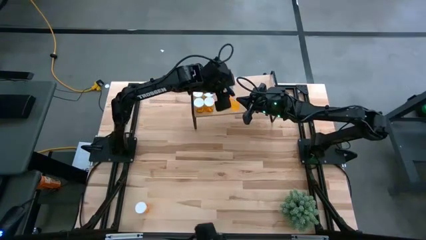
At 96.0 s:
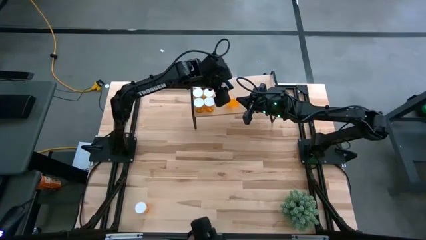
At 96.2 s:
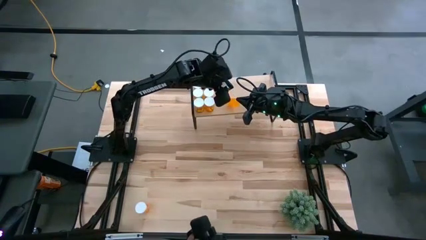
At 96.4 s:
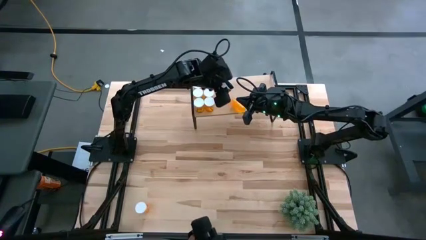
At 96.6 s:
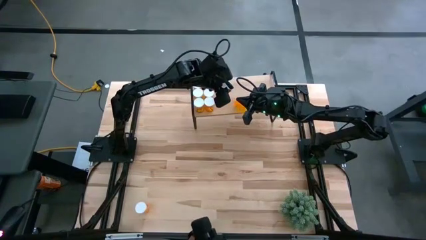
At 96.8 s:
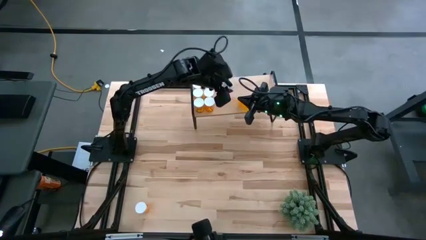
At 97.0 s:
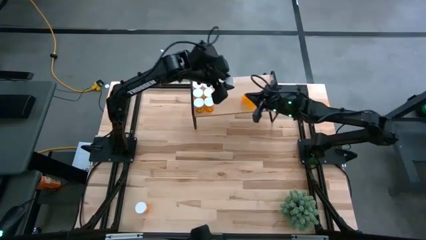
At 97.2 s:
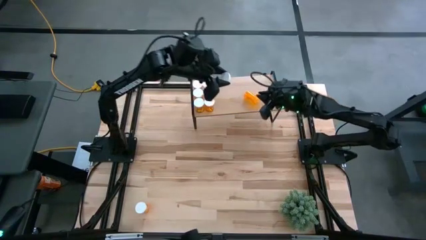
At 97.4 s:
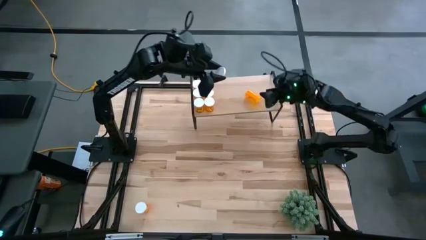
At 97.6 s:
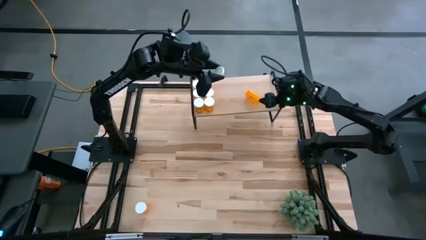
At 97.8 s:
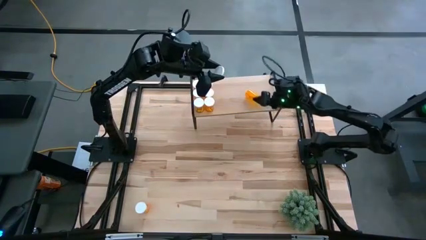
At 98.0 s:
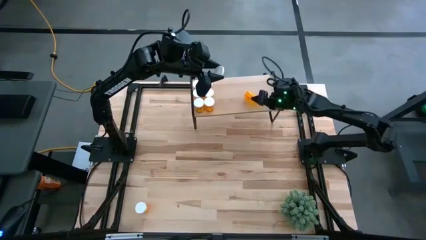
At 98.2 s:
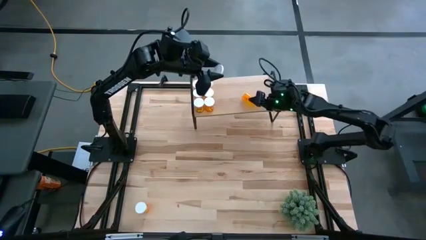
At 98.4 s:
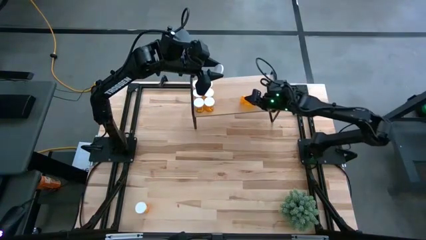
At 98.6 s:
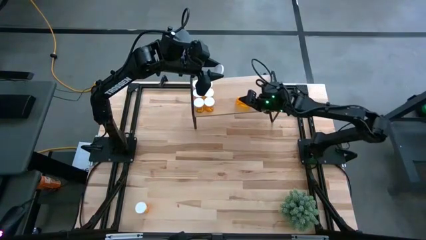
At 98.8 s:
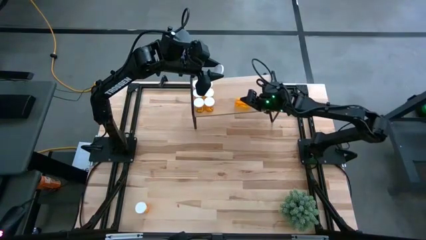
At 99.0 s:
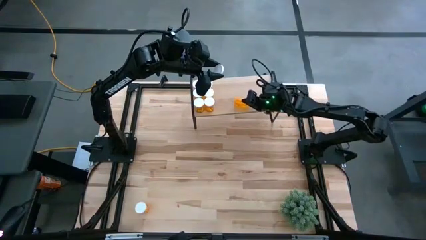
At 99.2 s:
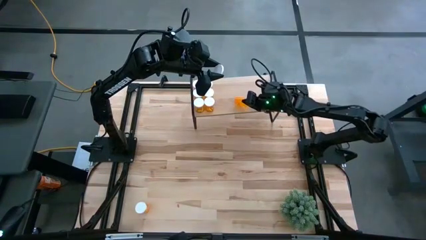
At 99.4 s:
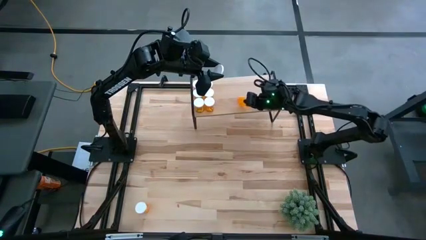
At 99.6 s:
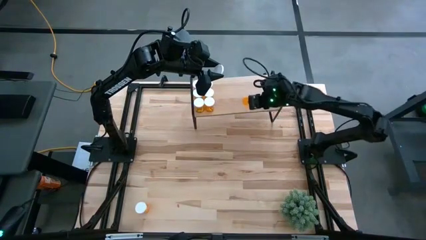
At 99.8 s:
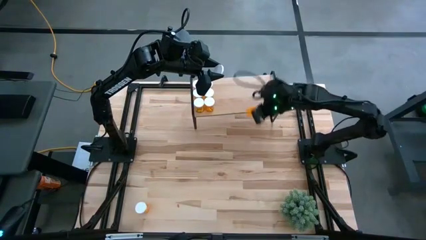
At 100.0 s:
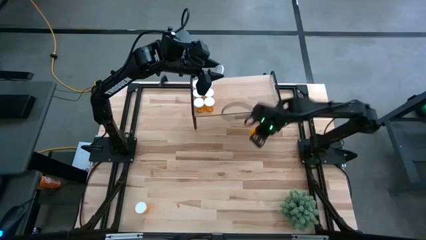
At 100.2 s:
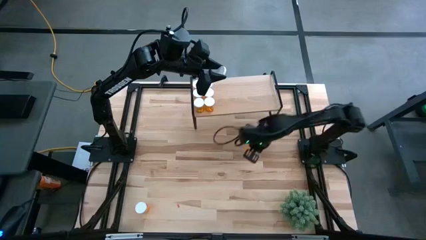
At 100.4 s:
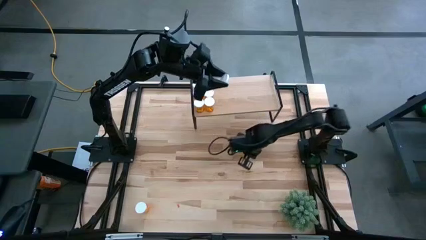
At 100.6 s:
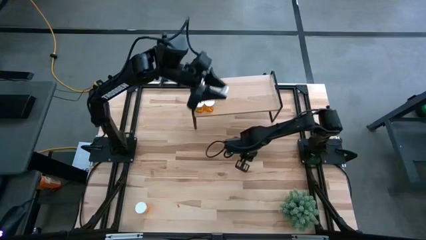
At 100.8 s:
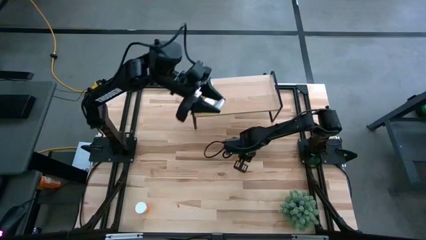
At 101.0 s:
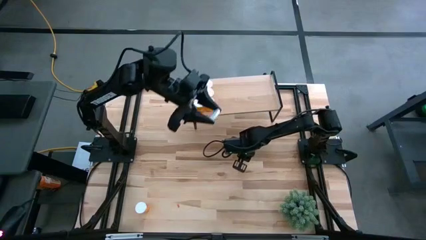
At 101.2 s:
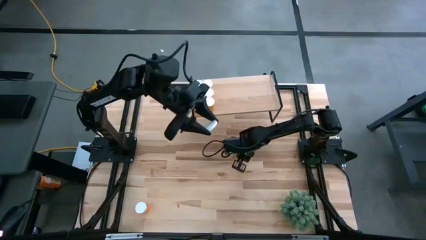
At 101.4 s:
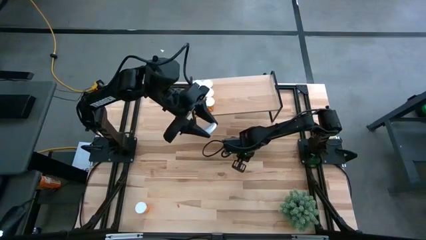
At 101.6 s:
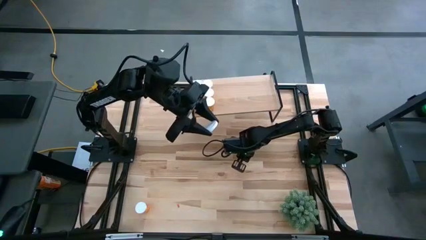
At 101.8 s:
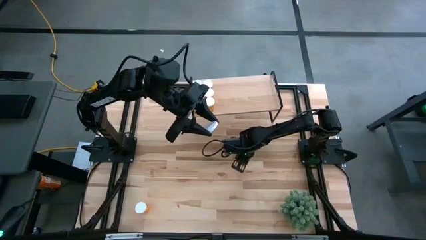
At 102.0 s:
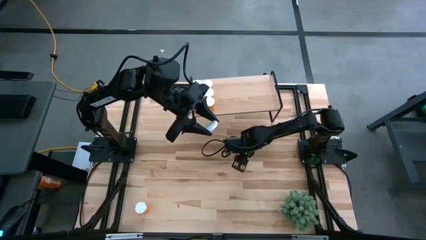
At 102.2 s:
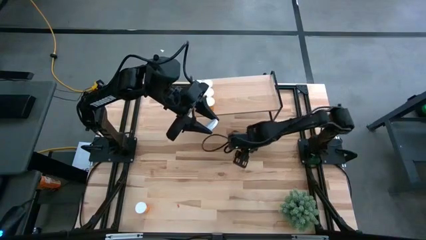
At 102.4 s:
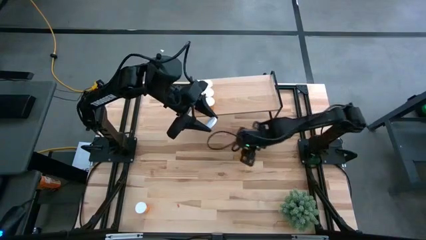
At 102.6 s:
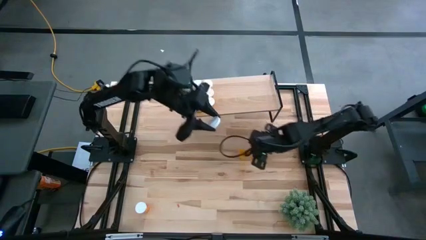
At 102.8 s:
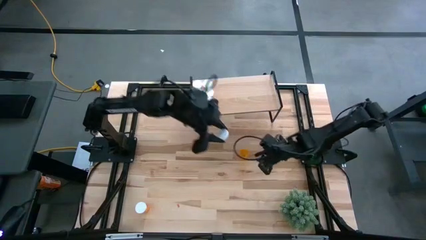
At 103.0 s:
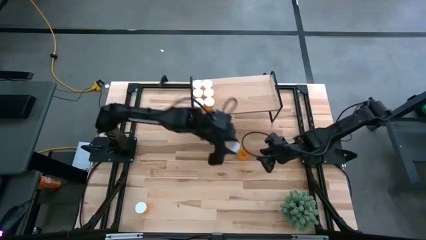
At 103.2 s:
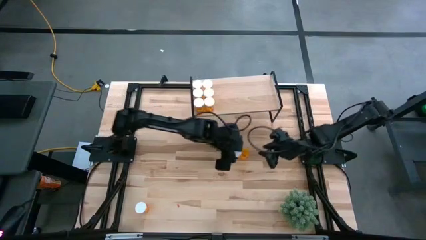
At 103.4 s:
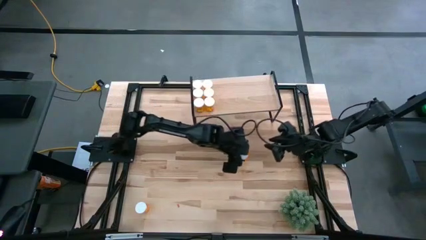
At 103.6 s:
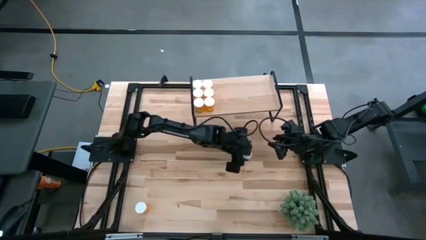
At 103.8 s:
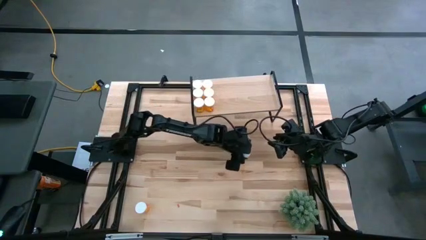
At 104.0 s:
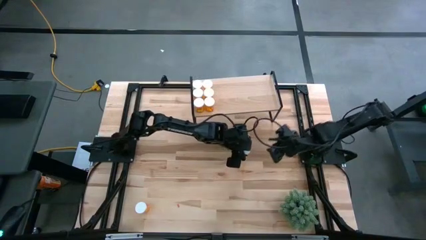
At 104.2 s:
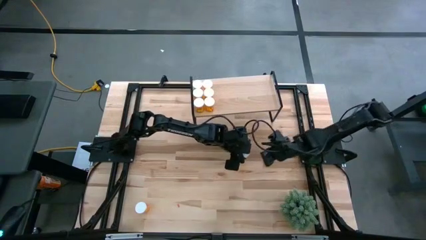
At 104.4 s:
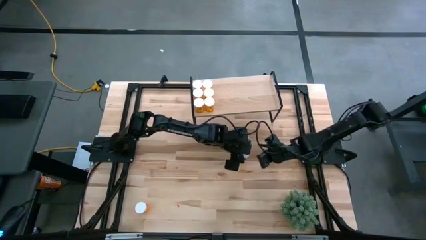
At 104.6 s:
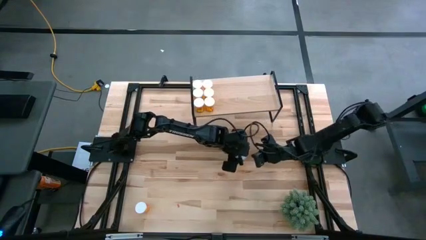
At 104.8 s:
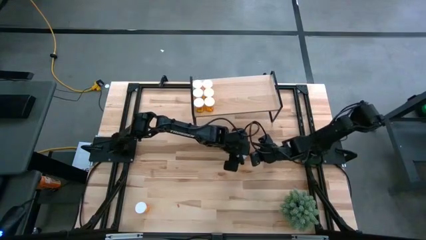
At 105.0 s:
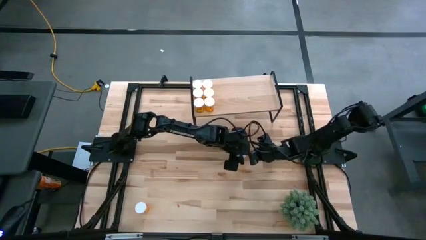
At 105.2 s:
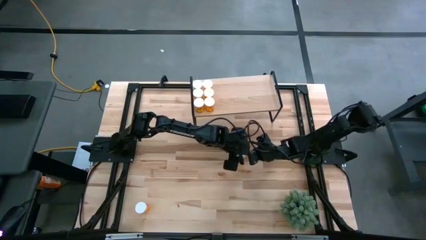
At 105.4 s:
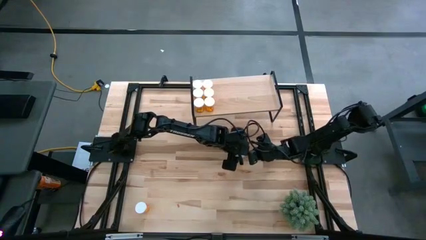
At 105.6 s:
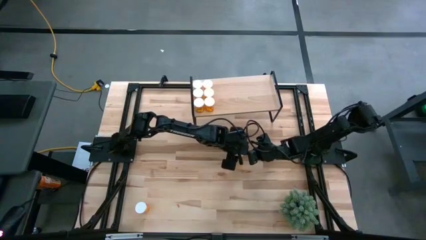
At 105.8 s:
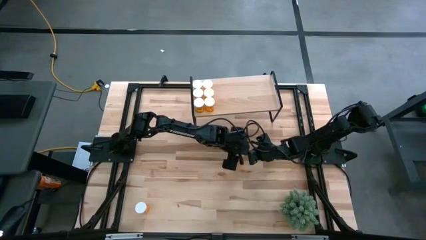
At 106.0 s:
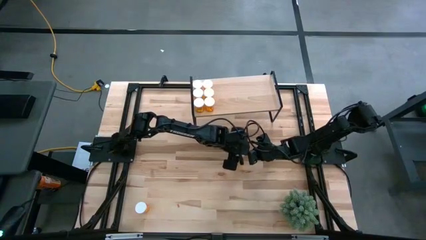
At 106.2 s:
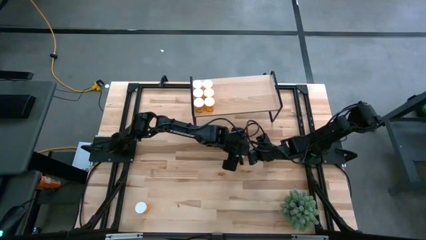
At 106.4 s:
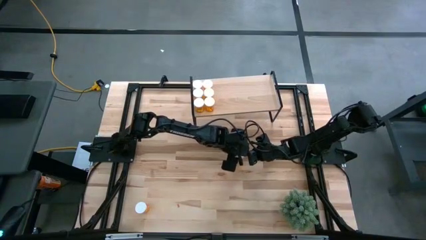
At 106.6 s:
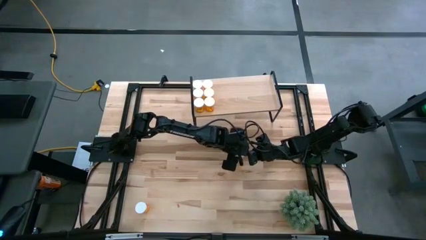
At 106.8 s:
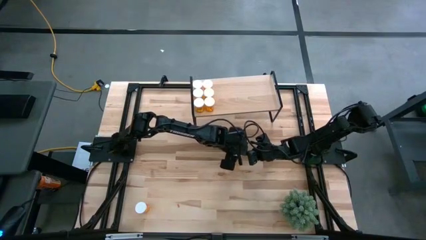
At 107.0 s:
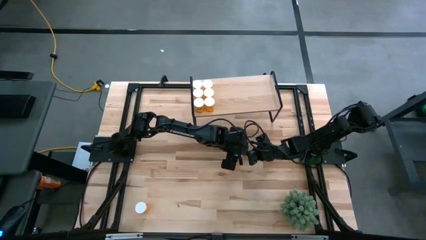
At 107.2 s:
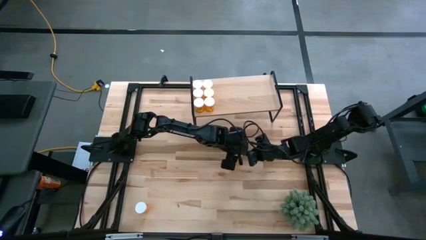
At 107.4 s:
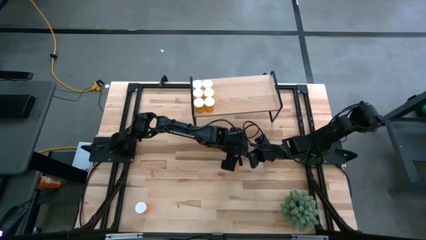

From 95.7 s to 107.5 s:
Task: Pick and place medicine bottles onto shelf by color
Put the orange pill bottle on the shelf
